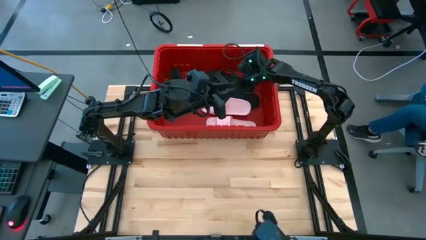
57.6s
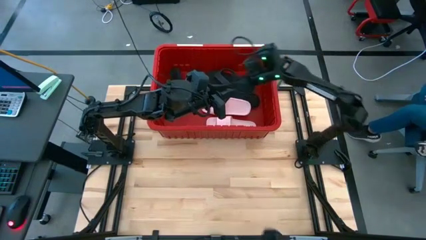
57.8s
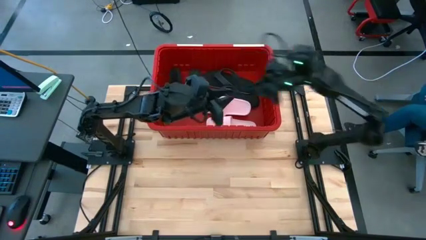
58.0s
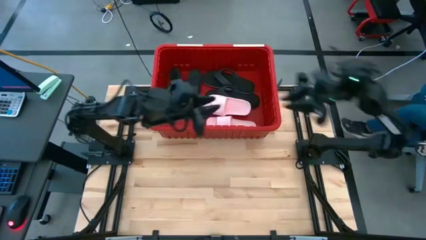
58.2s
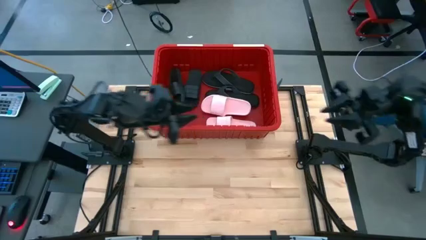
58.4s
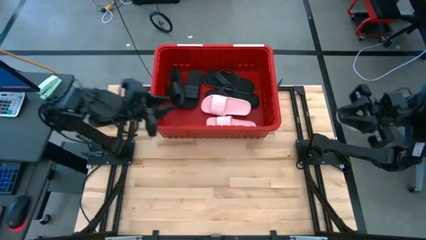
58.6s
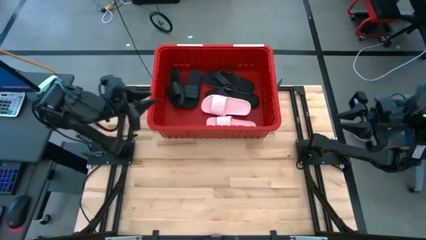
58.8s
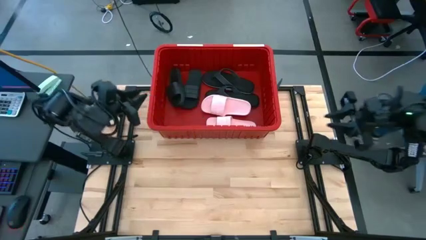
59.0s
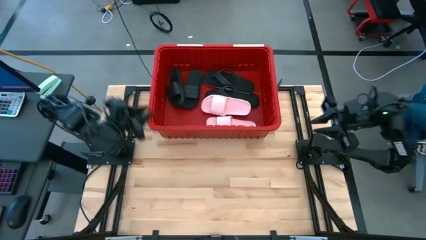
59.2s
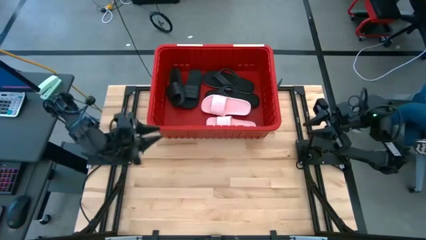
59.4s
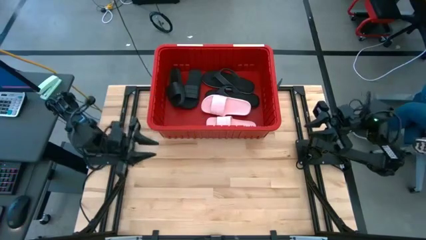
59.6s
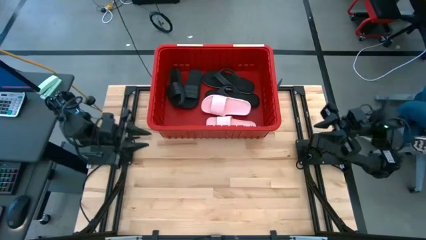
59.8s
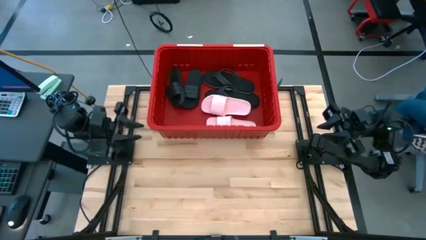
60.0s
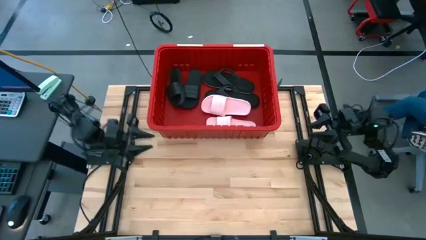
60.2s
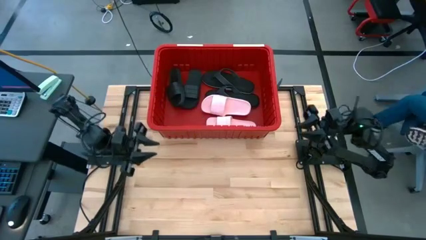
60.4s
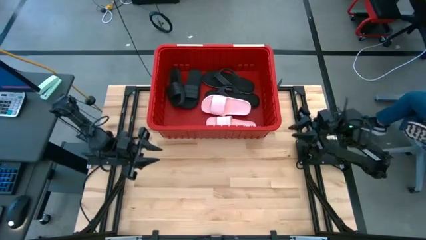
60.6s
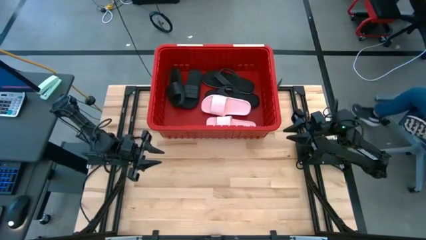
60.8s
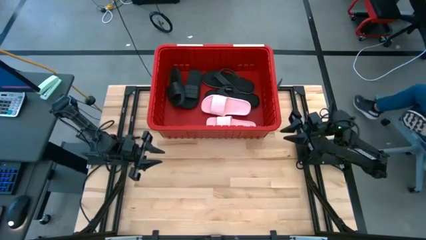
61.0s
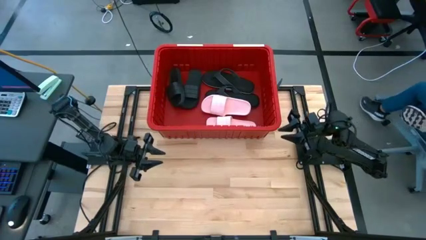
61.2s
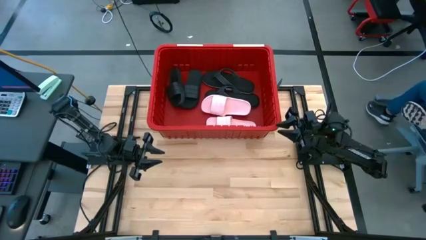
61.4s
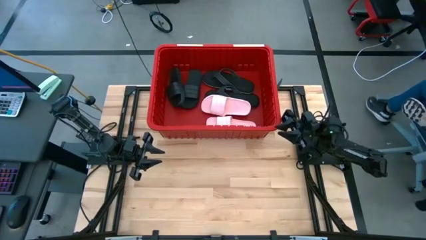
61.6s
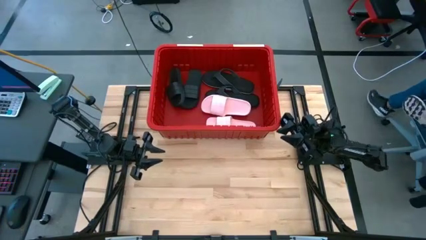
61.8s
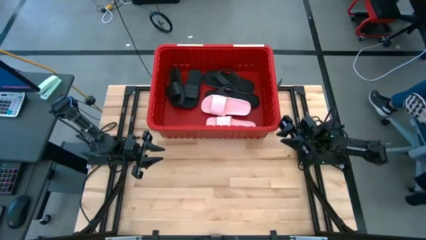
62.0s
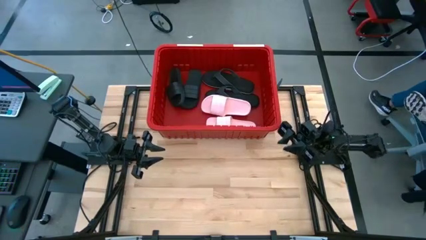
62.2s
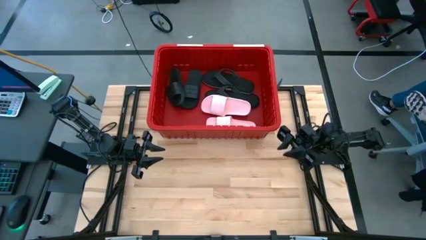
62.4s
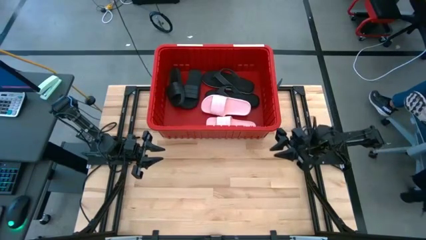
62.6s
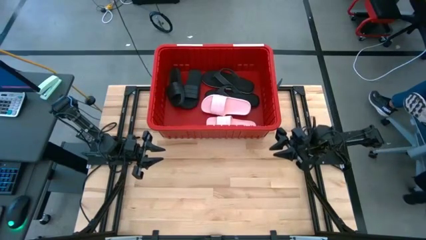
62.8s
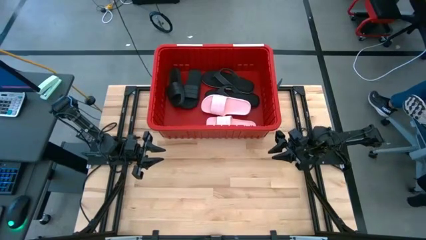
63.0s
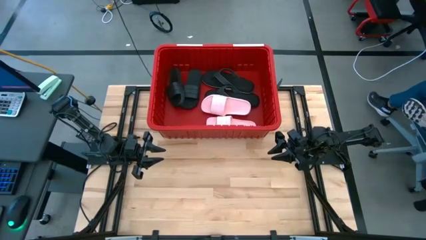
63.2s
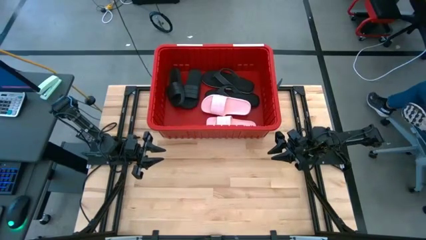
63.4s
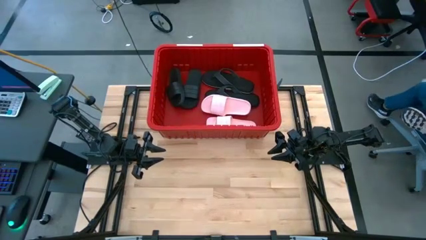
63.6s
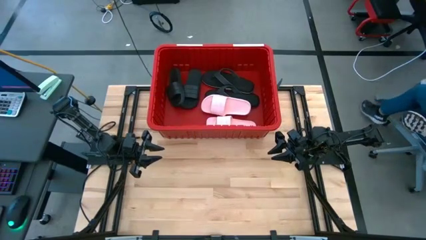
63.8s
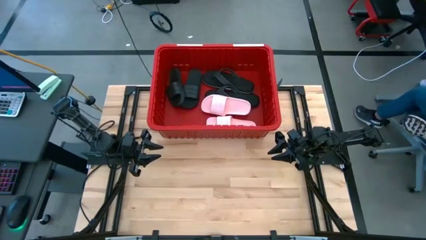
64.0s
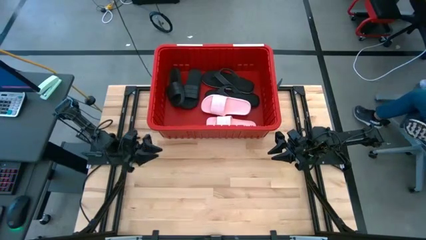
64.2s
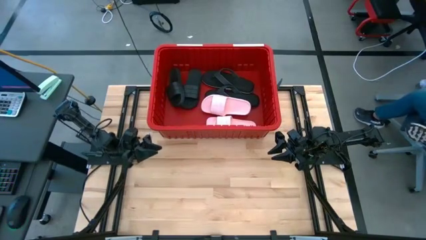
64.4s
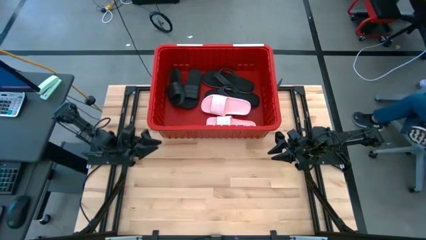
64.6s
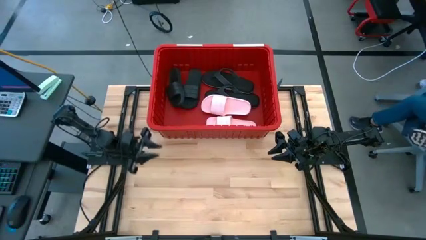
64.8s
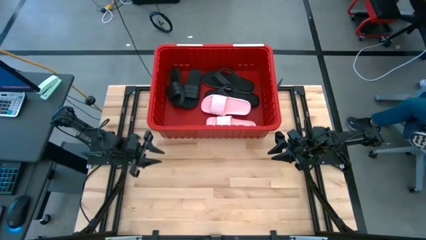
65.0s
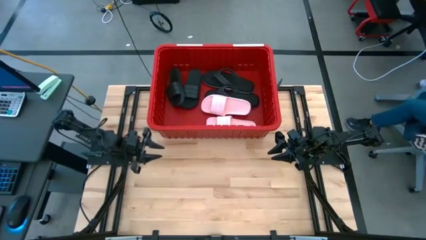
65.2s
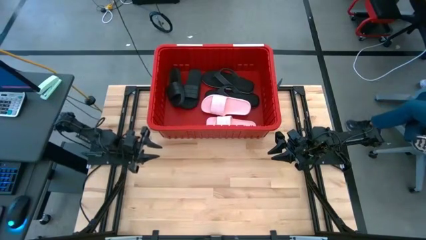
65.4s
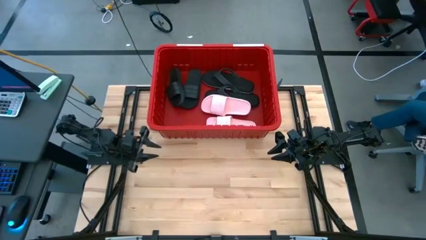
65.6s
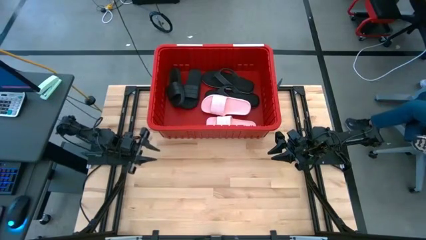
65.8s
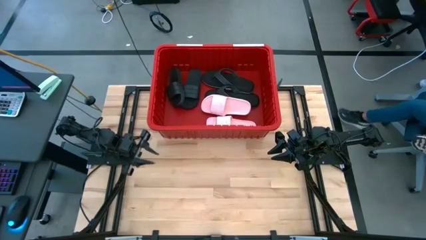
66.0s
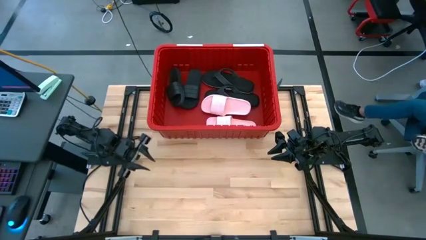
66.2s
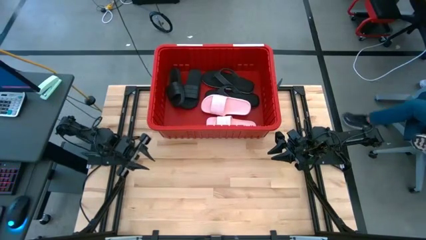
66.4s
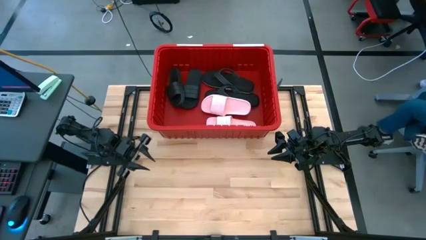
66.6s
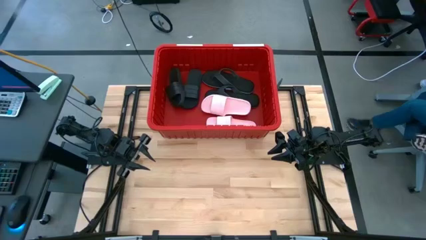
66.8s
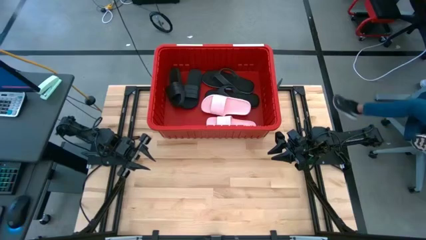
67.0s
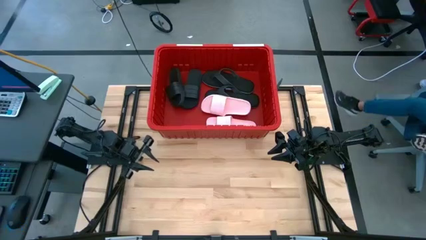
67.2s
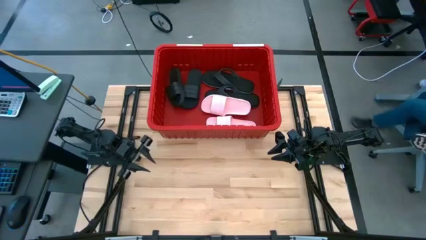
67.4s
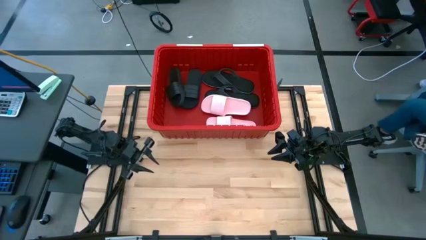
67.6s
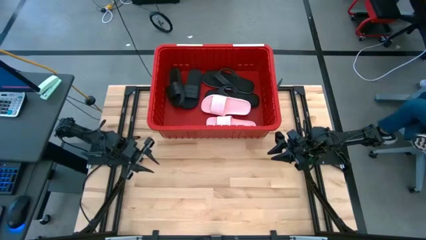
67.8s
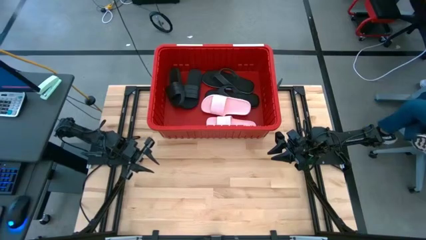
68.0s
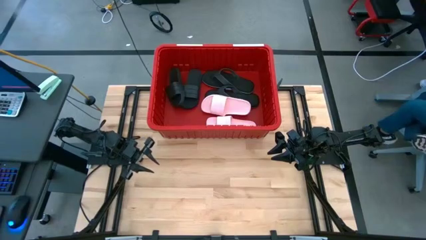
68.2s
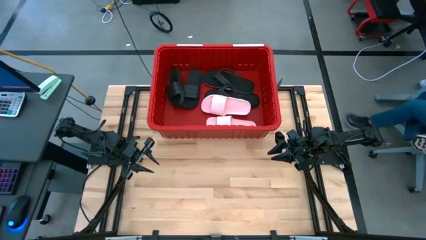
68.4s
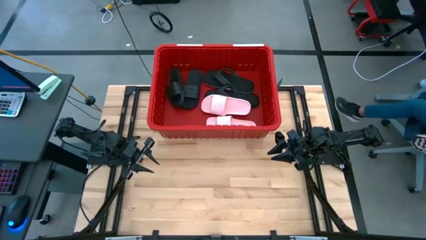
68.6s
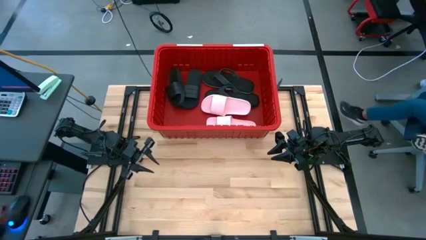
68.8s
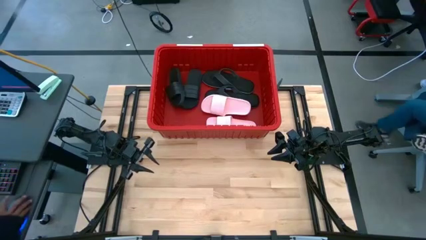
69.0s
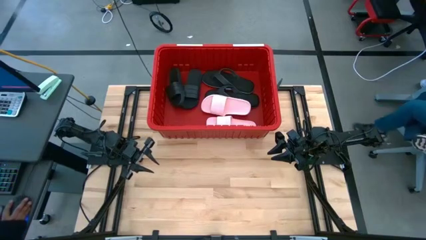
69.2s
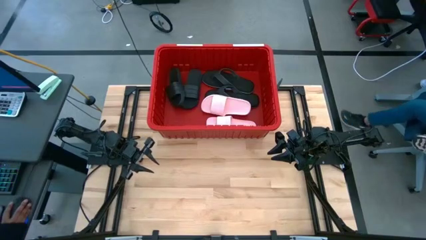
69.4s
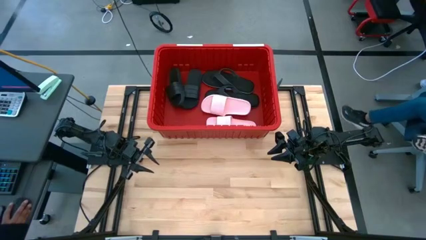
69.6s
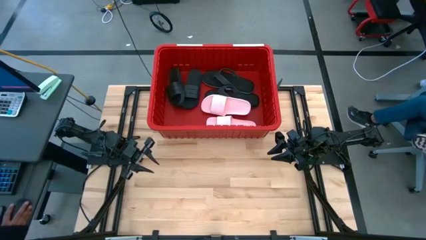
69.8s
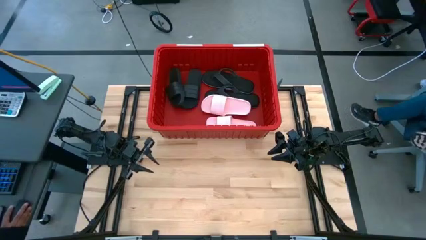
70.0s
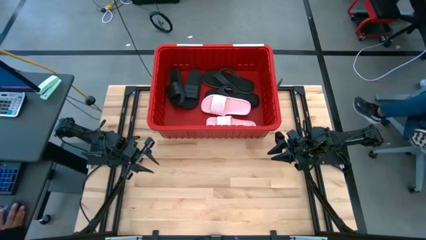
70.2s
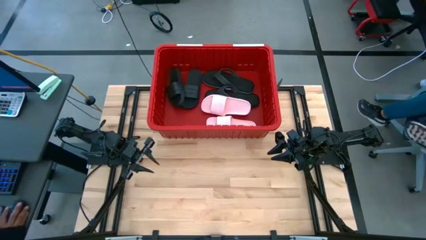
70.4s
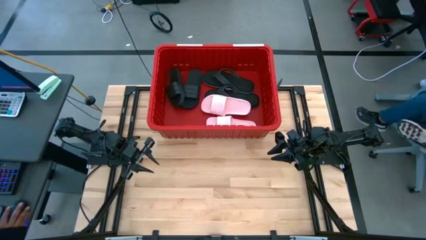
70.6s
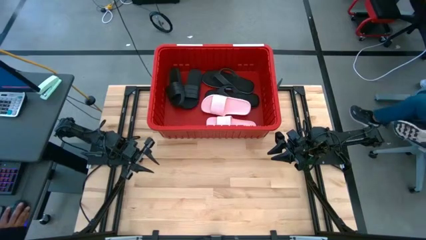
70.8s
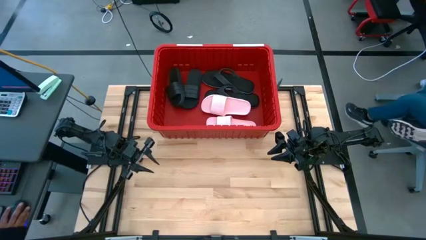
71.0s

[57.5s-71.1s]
Task: Pick and place slides into bin
Return to home position

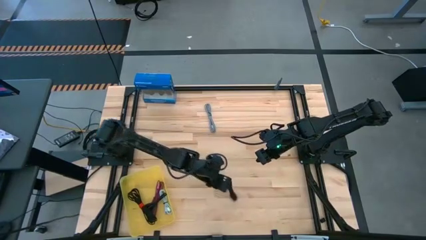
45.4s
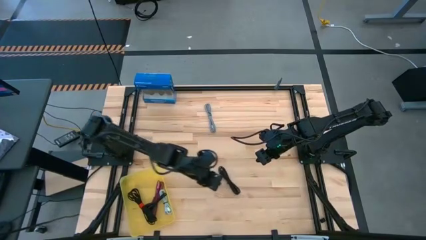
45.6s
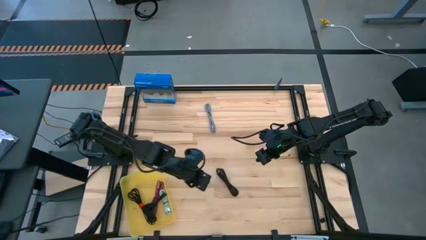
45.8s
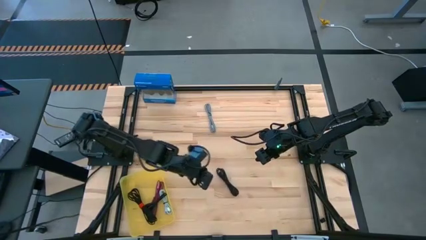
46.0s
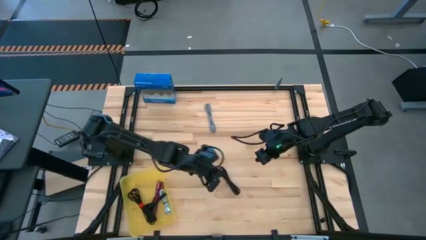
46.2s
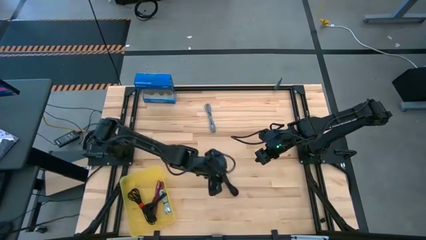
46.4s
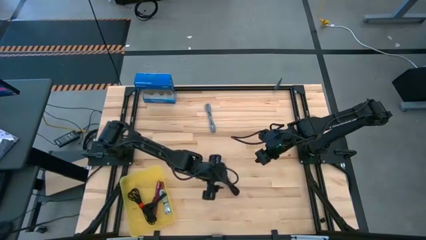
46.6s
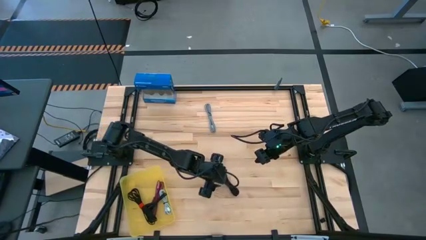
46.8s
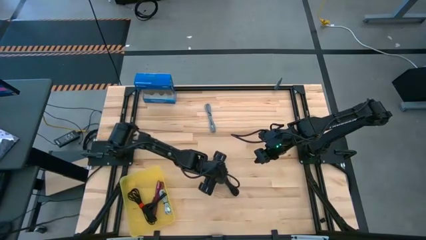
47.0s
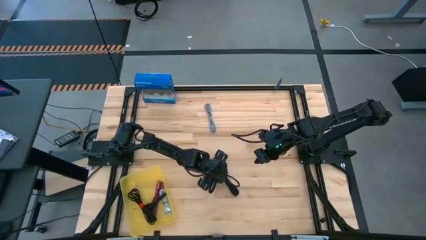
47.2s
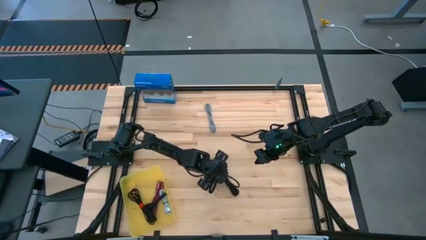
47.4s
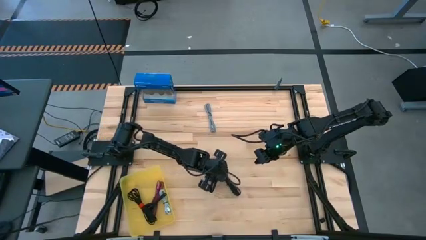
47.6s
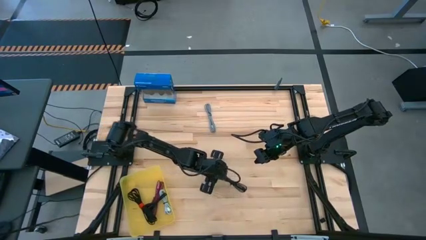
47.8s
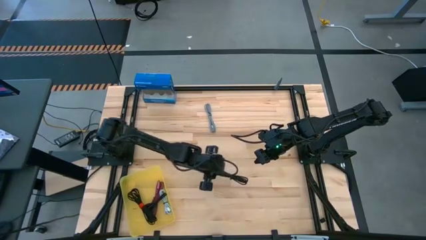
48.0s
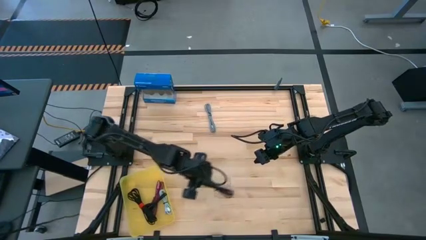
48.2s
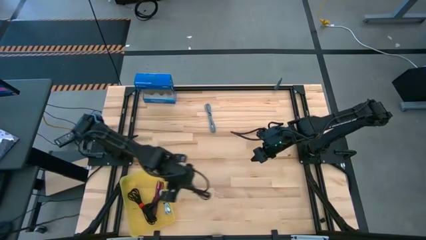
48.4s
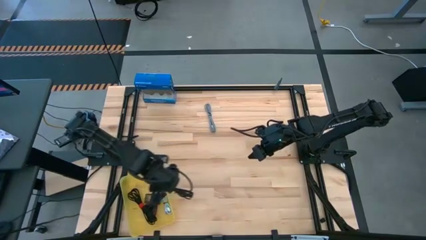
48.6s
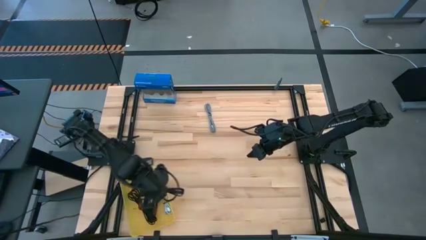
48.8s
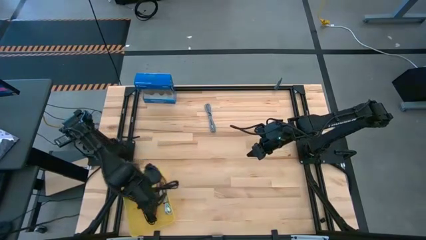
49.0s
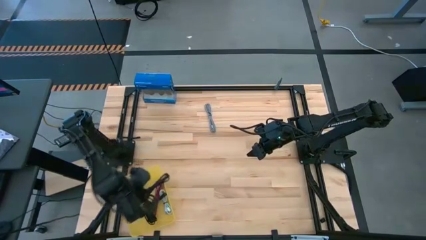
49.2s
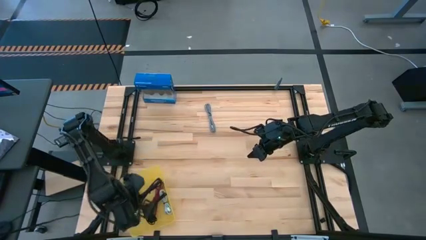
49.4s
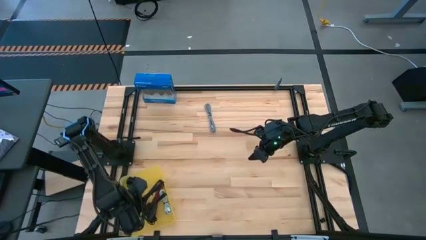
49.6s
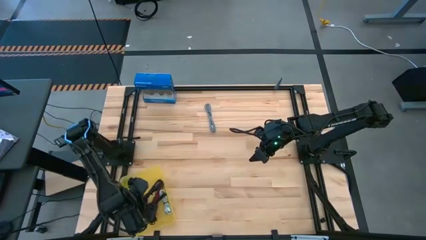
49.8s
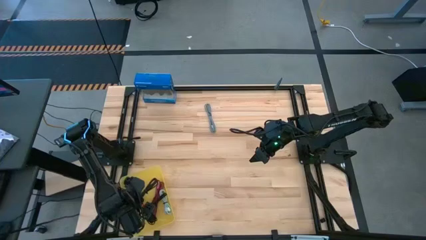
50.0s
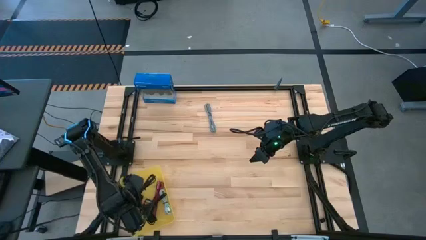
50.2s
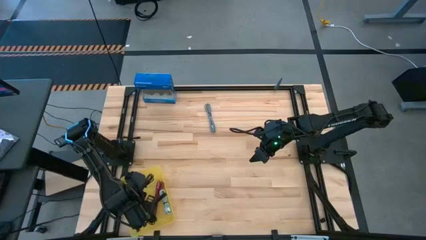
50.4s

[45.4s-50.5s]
Task: Pick and place USB-C Cables
Put the black charger cable into the yellow bin
